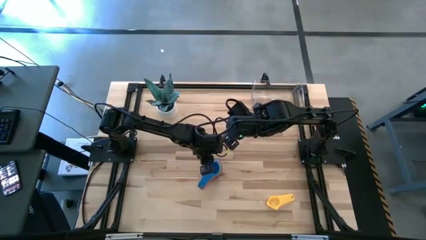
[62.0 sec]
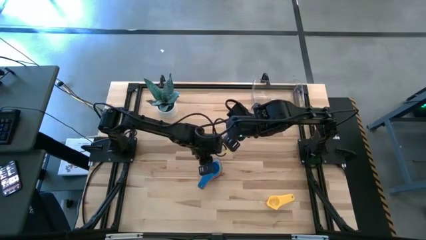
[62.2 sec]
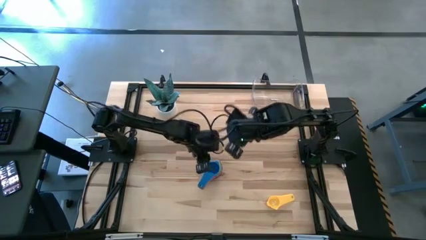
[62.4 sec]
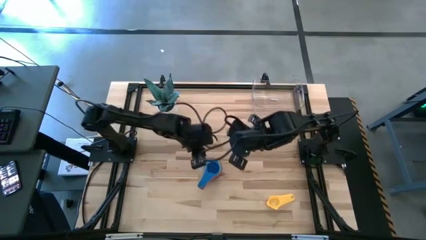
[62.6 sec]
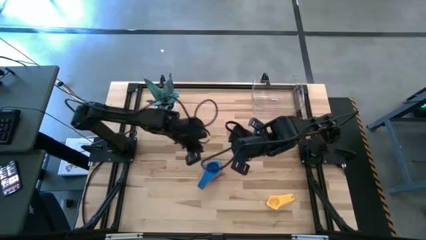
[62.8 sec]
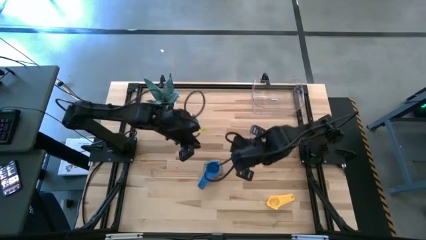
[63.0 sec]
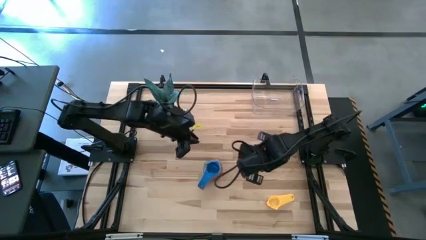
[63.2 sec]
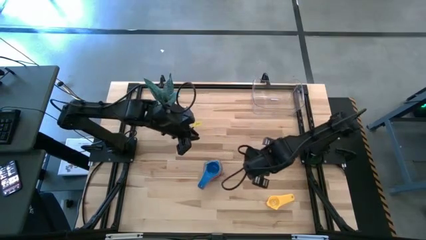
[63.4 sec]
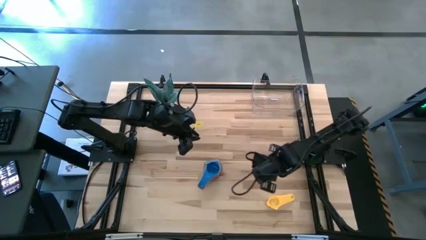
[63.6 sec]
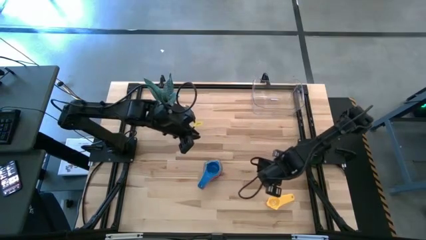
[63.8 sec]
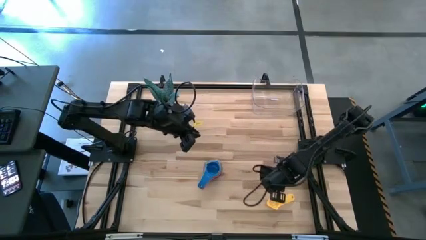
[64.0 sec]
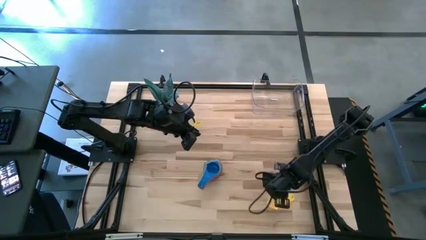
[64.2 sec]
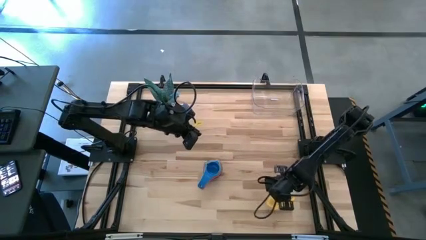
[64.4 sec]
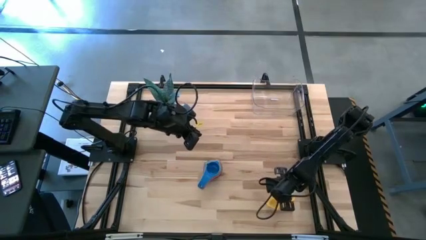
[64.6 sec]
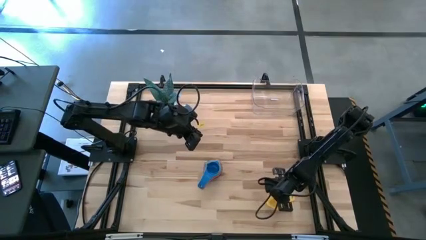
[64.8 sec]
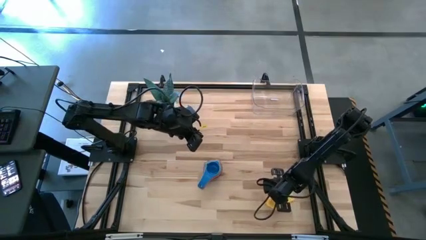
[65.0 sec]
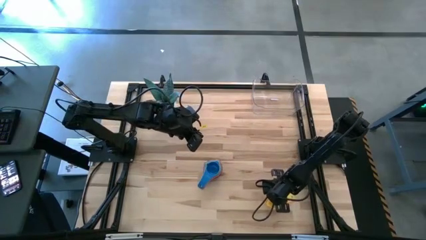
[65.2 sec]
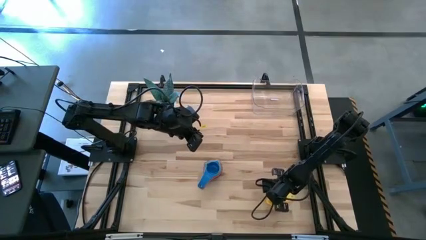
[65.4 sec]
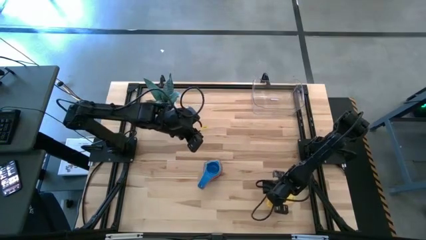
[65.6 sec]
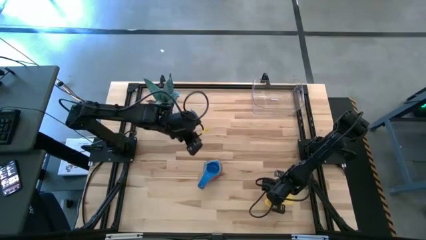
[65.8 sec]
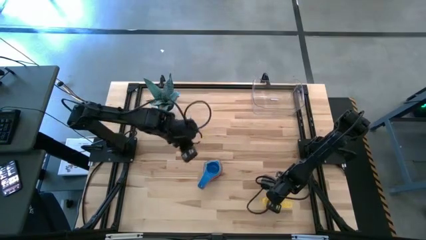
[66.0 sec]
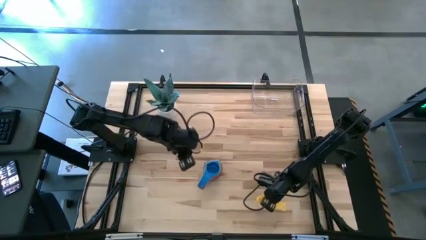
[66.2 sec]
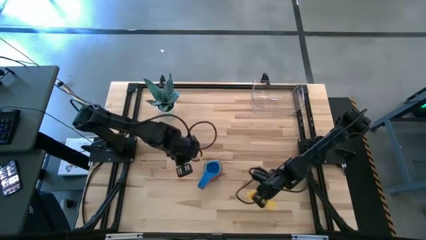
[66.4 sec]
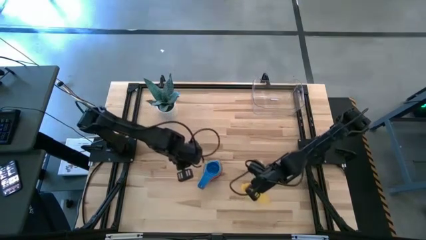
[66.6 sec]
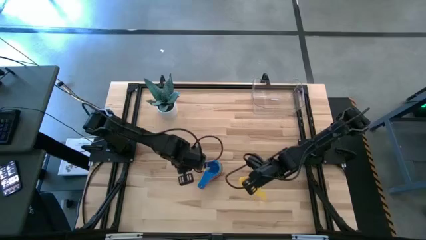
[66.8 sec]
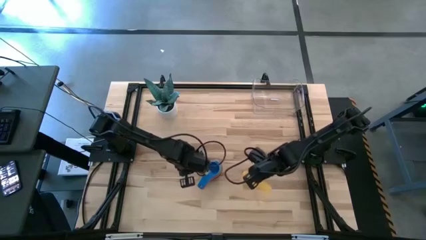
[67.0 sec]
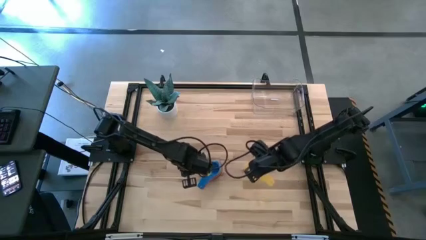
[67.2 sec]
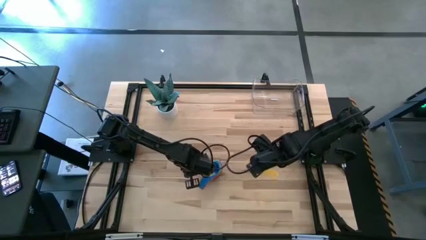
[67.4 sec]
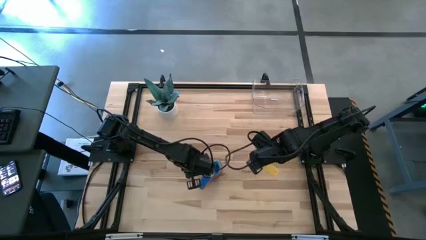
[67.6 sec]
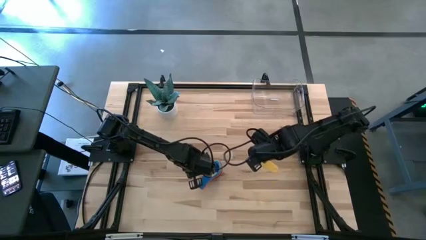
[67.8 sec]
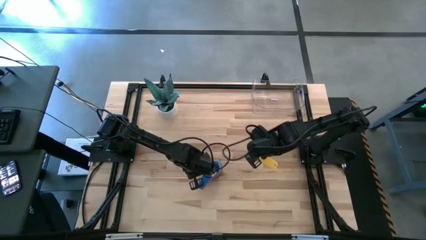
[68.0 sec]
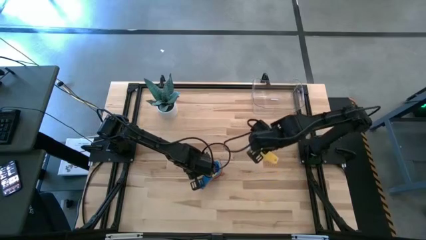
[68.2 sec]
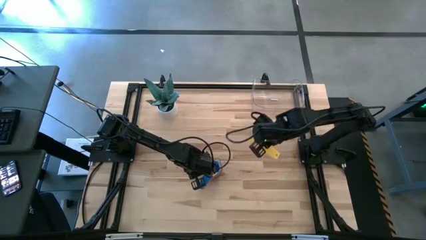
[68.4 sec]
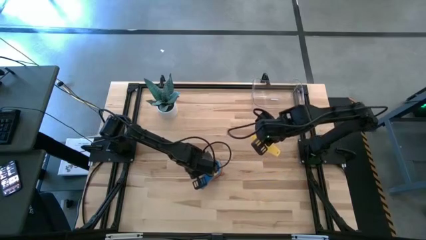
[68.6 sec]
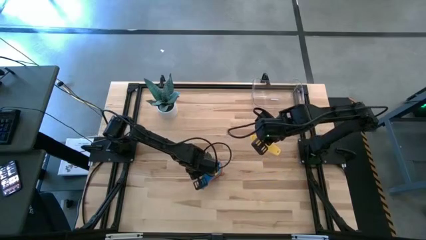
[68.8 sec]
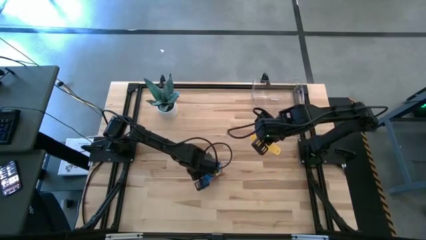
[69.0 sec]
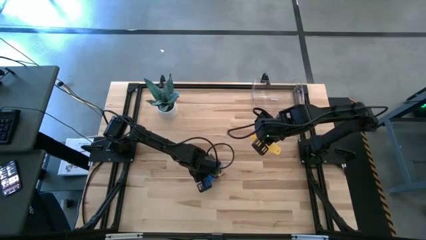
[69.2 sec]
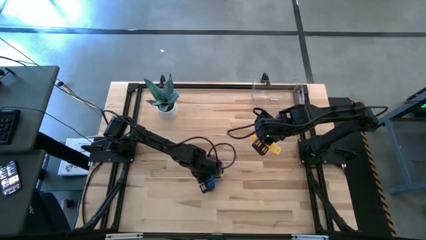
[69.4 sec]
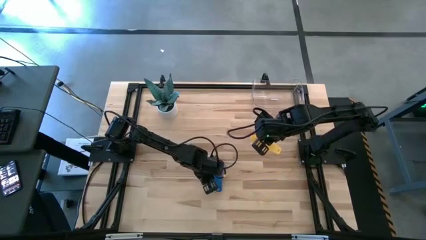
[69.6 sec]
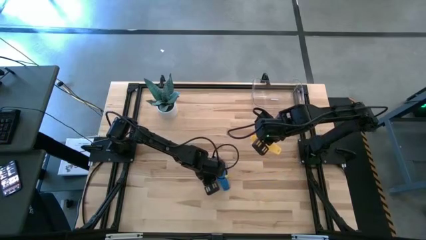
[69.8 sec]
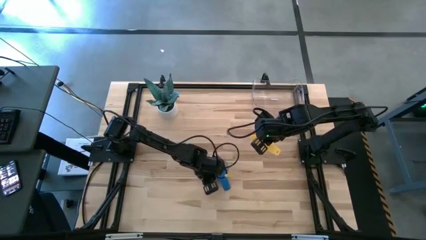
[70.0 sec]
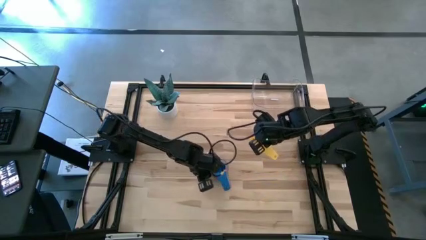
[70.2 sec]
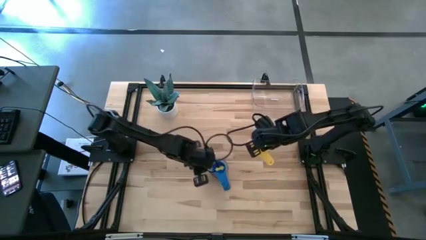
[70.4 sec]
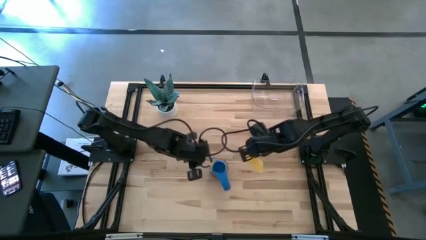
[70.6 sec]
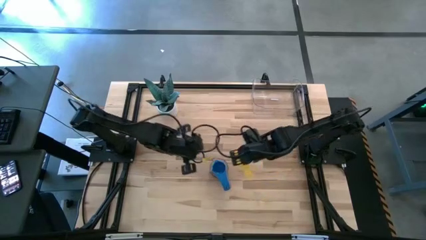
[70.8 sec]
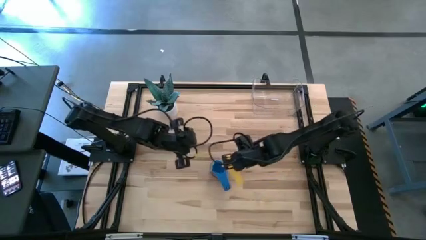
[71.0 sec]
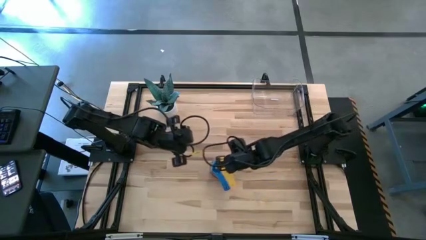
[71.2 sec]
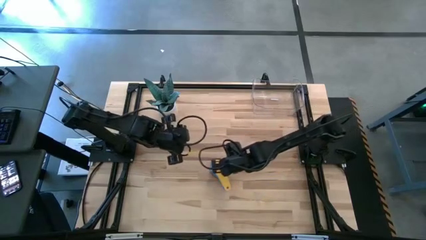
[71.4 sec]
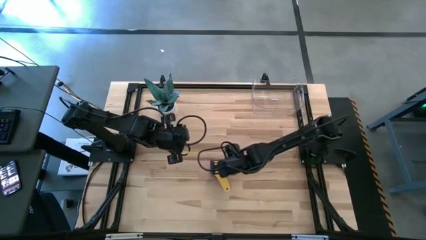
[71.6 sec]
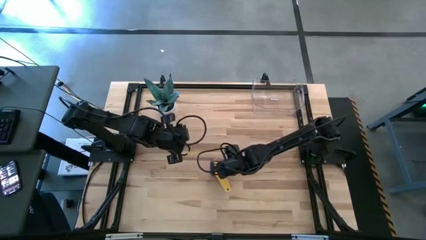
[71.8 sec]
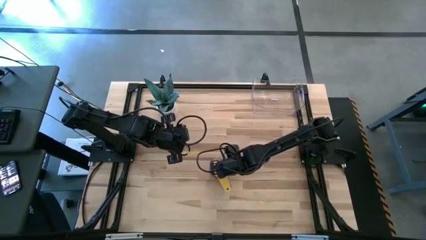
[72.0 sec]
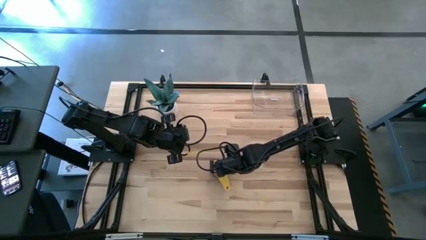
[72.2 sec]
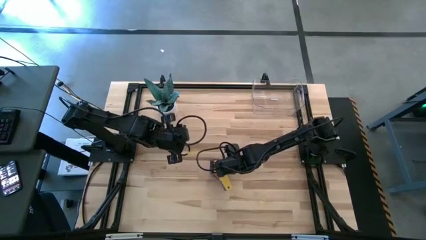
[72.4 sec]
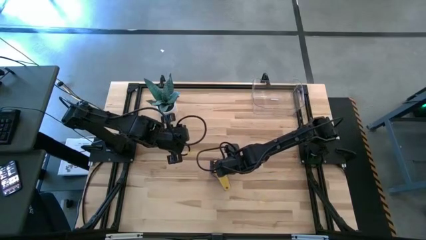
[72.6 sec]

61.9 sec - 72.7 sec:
Task: Nest measuring cups in basket
Stack the yellow measuring cup on top of the blue measuring cup
